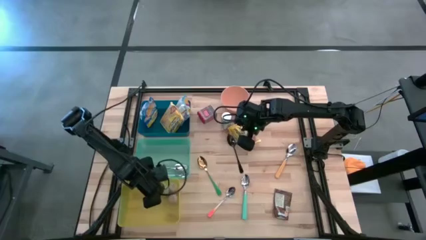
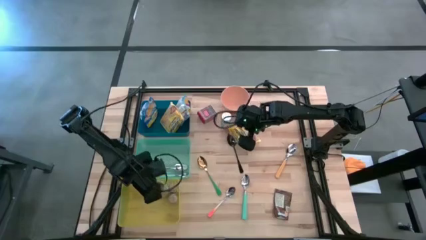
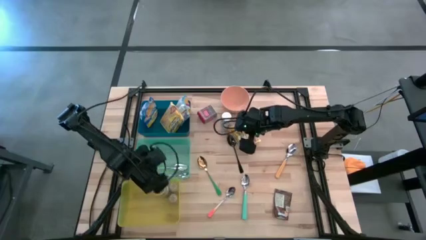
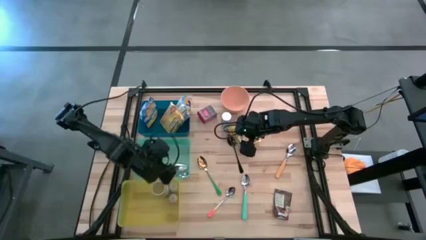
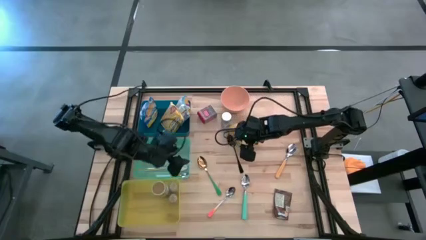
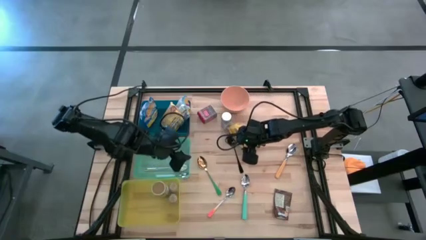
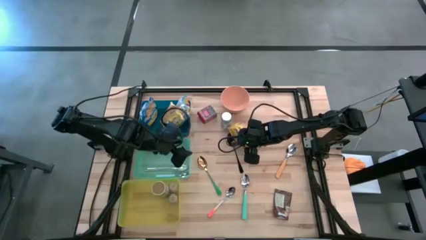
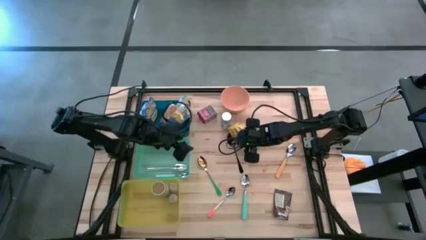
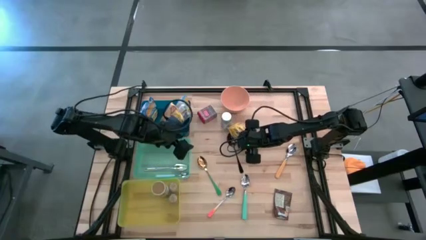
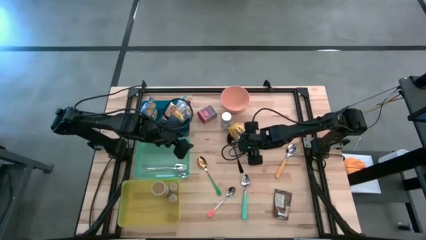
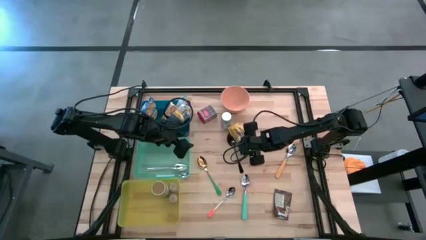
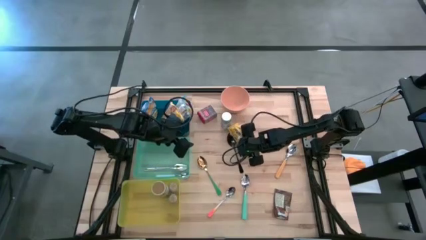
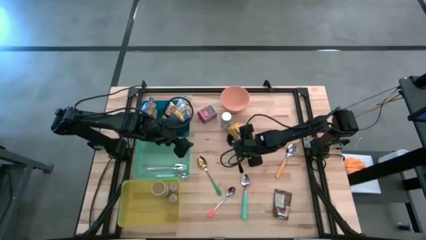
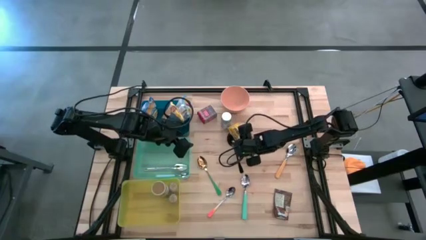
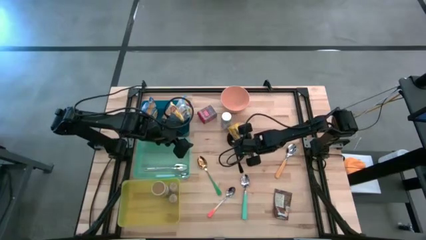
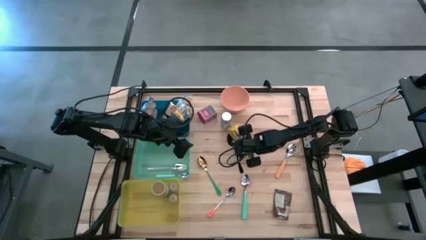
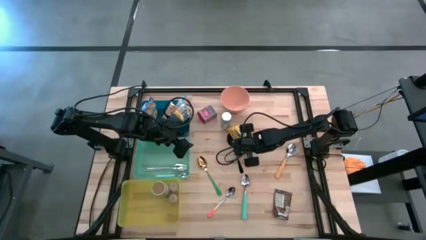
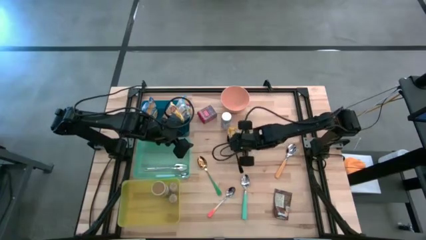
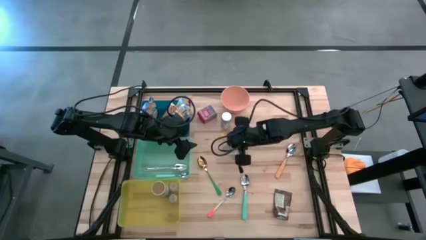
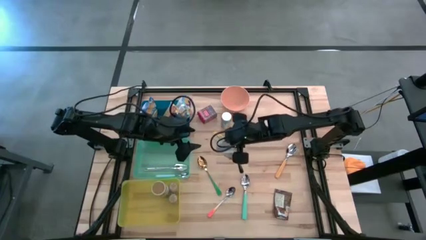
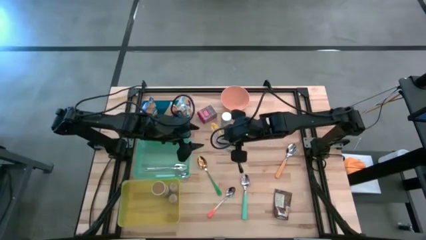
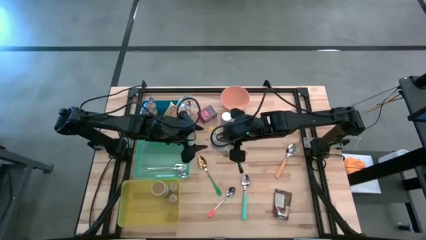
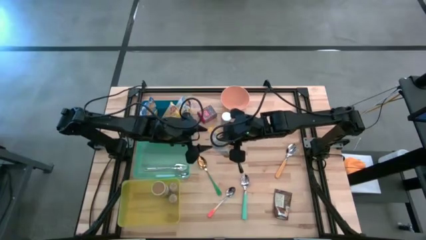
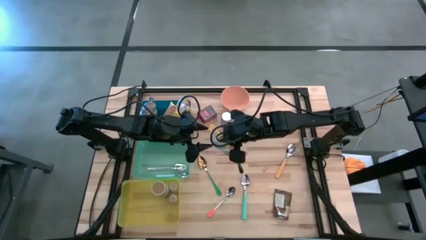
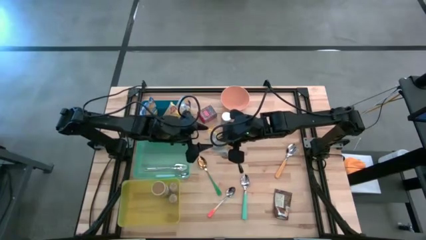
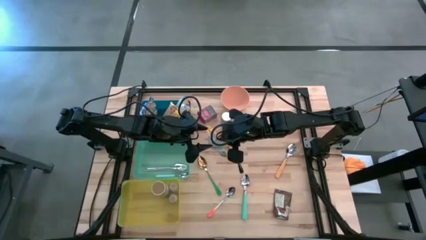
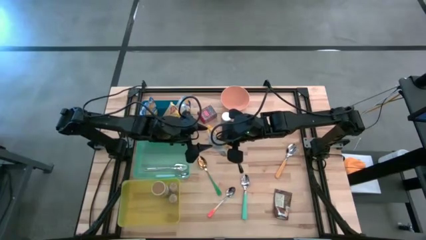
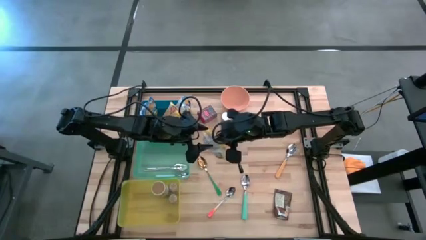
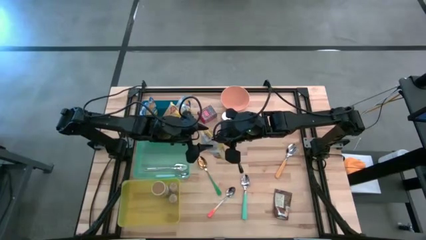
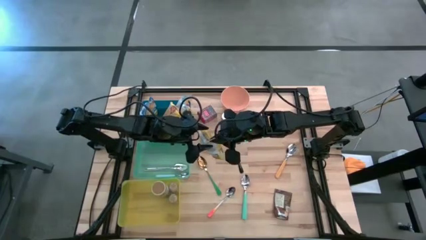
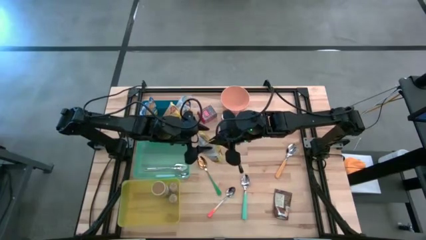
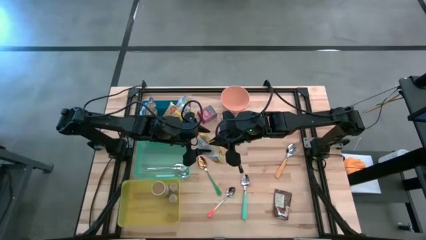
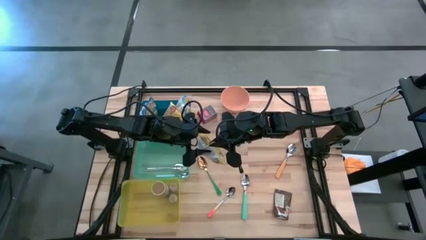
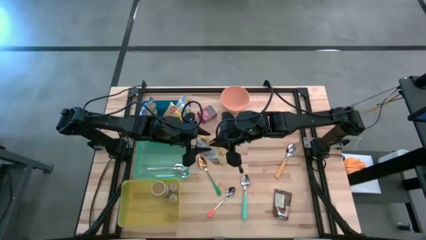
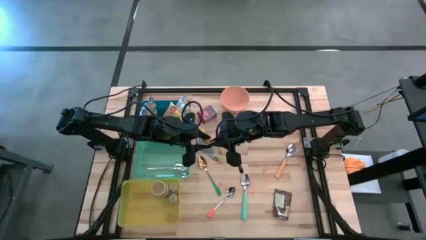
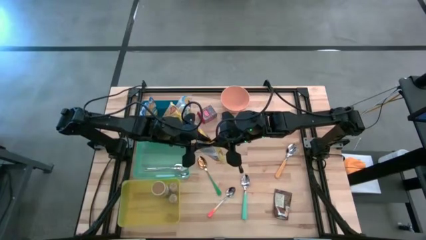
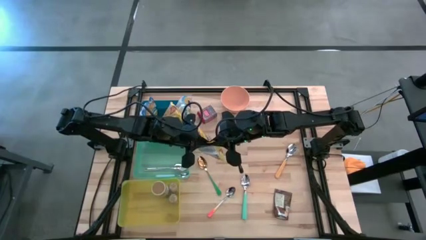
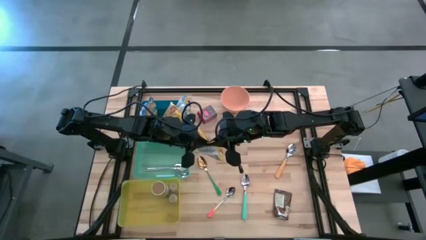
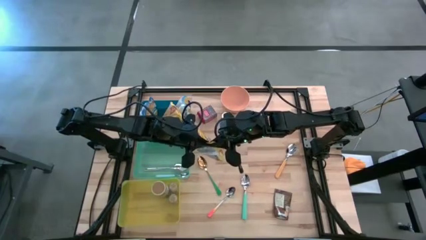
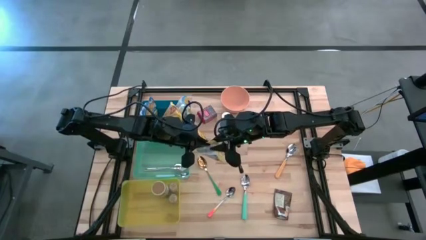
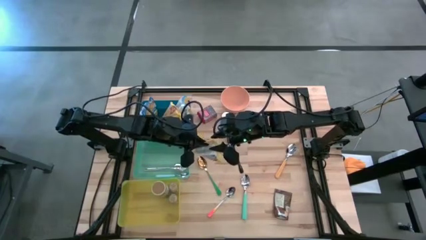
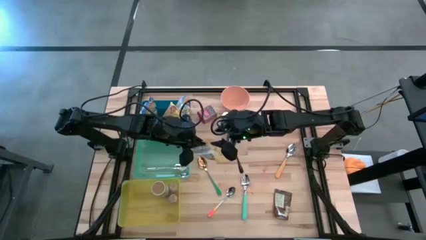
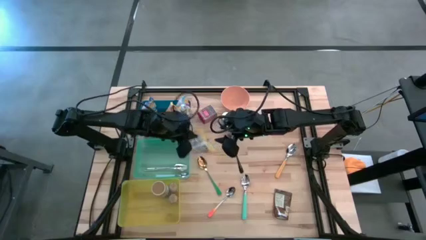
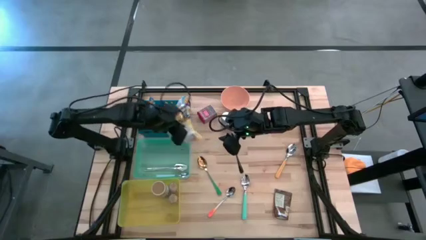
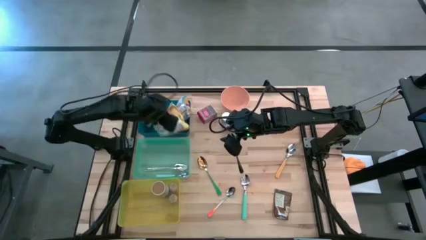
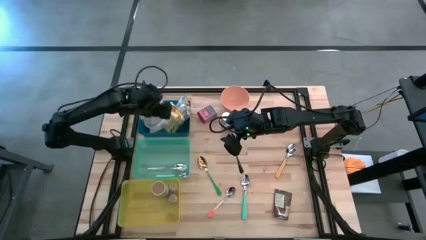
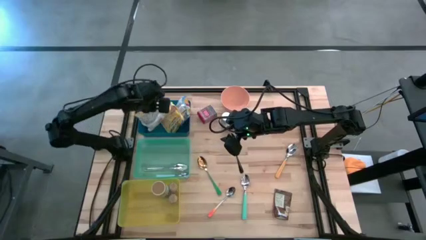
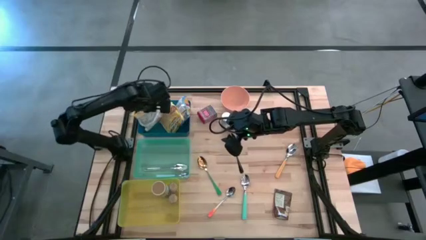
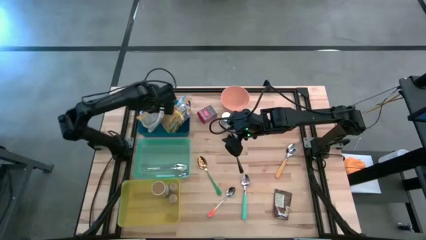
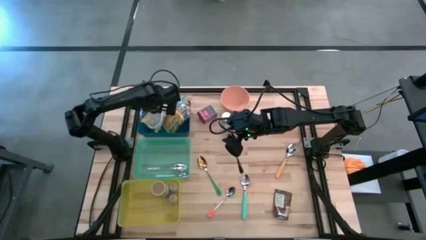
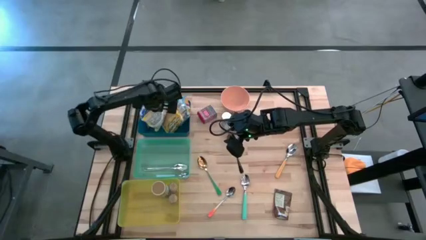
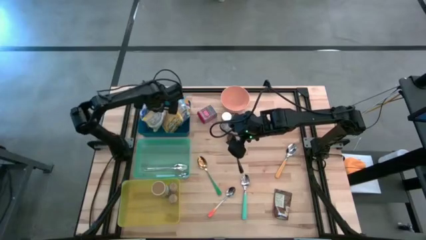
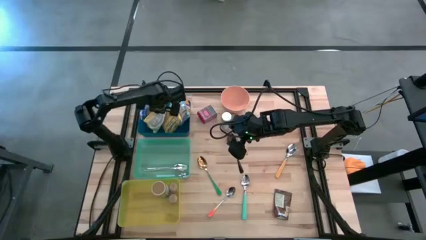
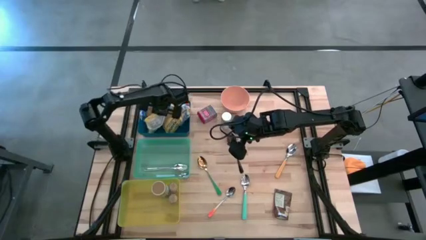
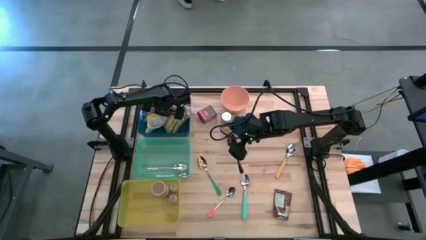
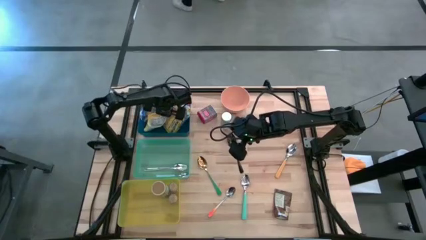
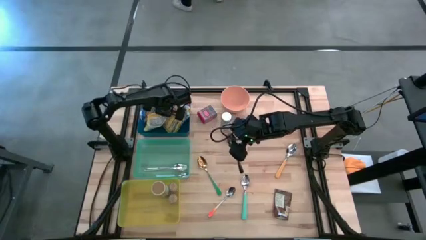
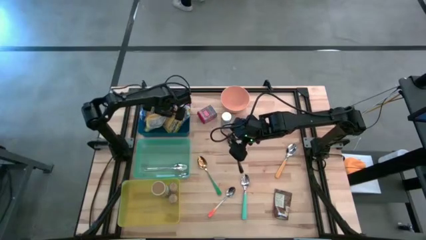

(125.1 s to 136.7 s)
Put the yellow noodles packet into the blue bin
